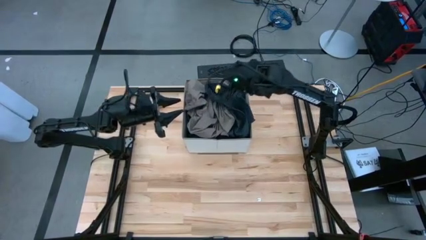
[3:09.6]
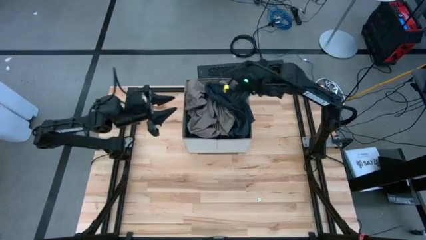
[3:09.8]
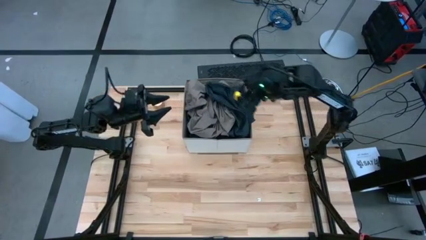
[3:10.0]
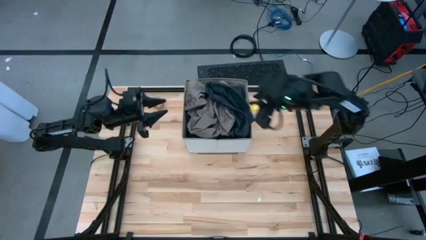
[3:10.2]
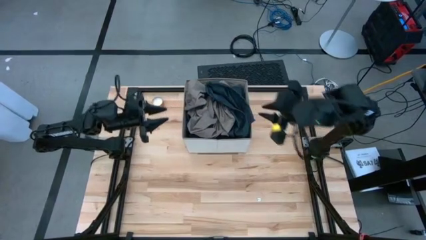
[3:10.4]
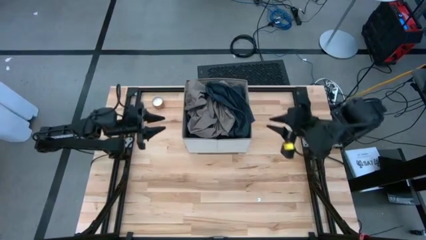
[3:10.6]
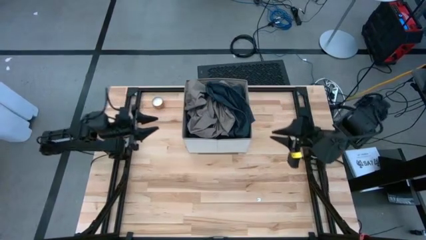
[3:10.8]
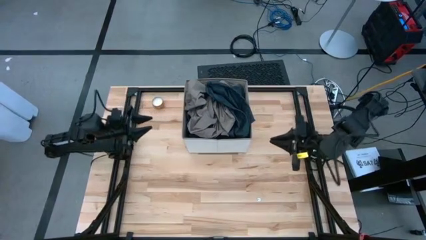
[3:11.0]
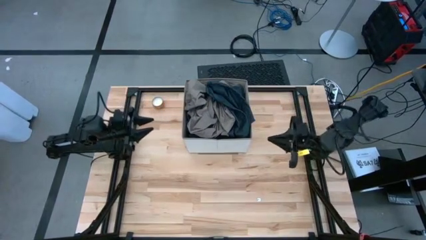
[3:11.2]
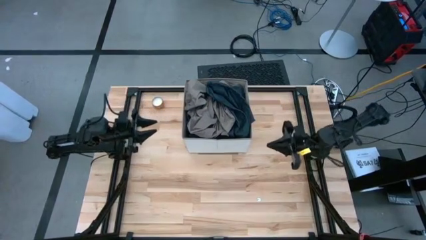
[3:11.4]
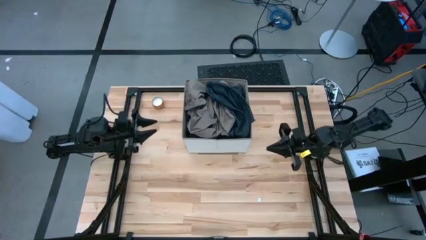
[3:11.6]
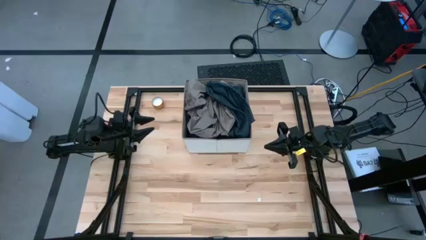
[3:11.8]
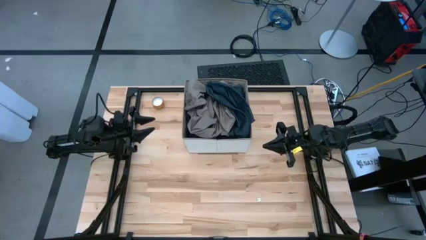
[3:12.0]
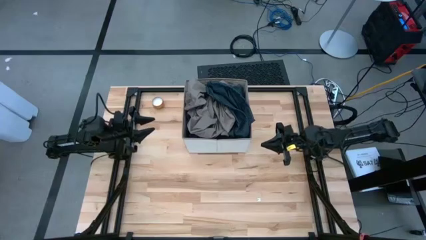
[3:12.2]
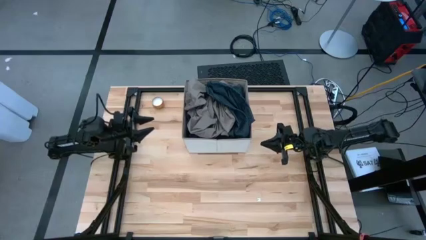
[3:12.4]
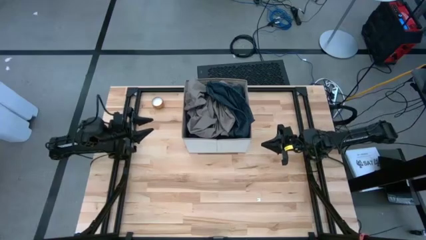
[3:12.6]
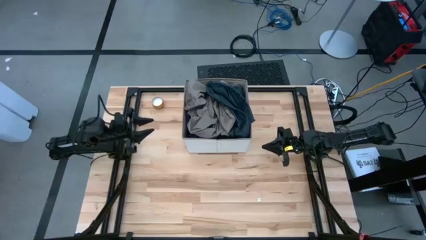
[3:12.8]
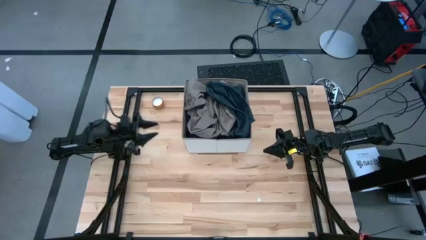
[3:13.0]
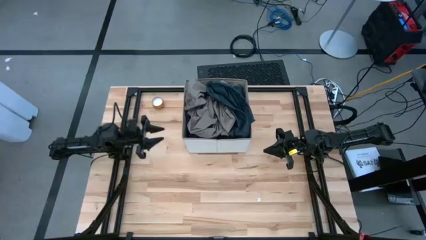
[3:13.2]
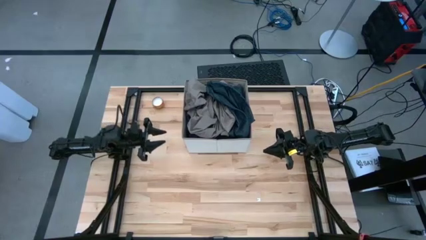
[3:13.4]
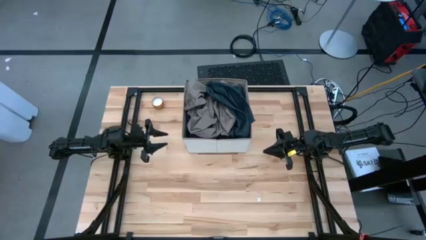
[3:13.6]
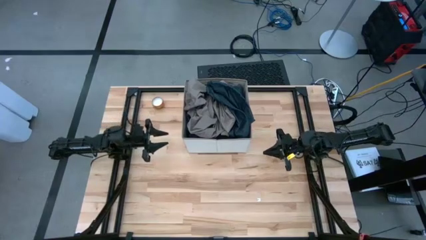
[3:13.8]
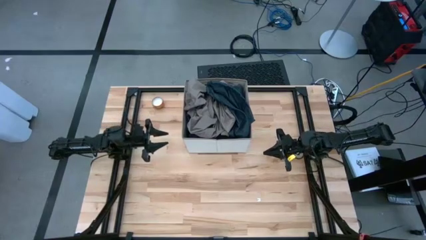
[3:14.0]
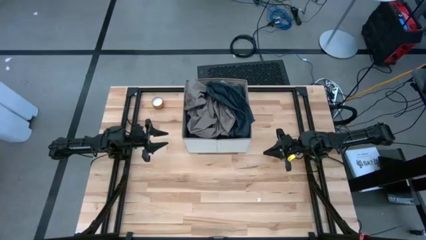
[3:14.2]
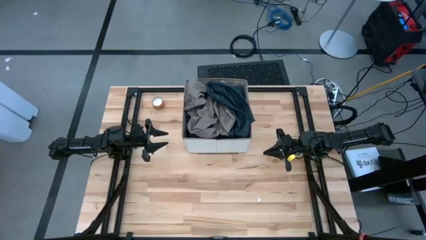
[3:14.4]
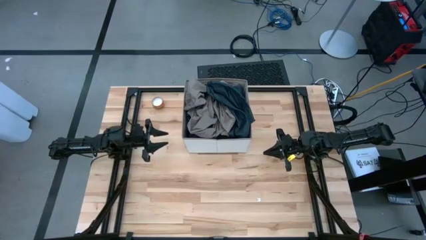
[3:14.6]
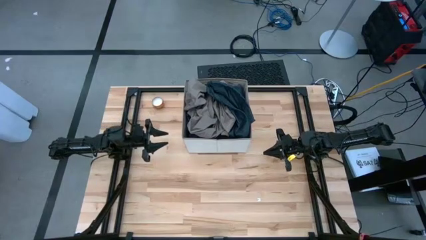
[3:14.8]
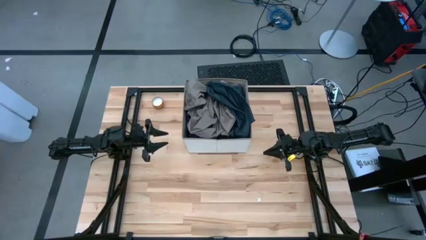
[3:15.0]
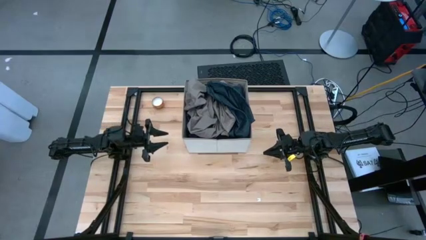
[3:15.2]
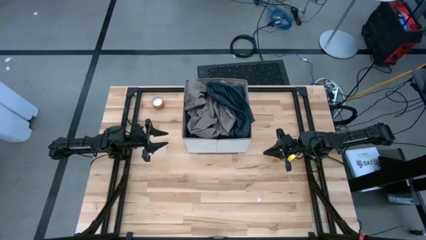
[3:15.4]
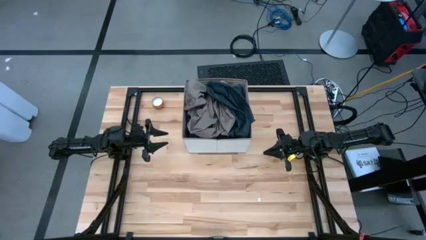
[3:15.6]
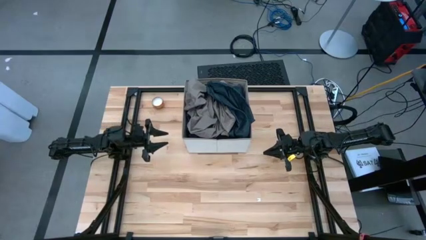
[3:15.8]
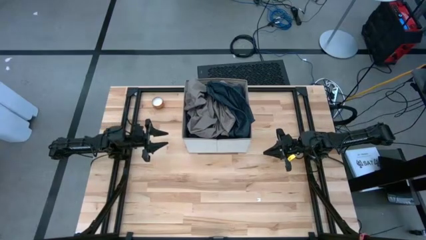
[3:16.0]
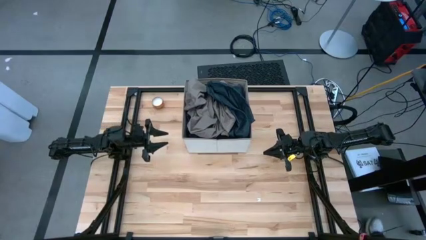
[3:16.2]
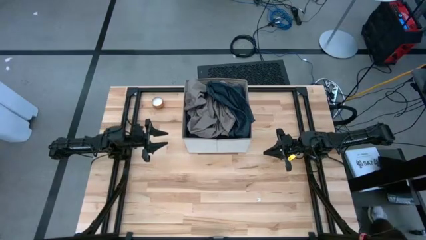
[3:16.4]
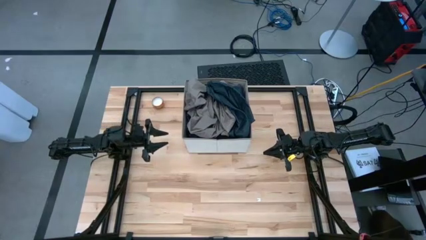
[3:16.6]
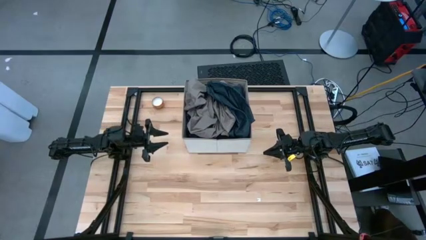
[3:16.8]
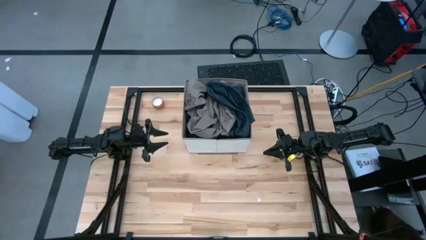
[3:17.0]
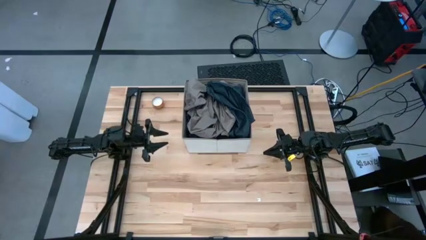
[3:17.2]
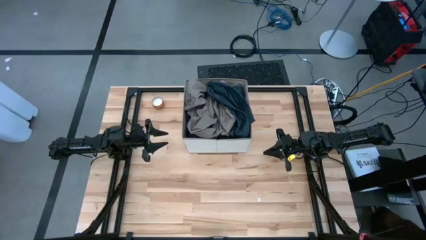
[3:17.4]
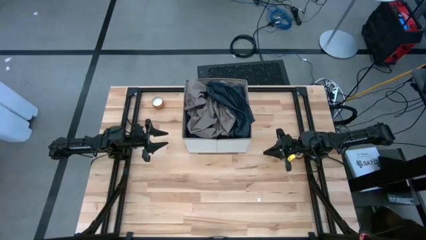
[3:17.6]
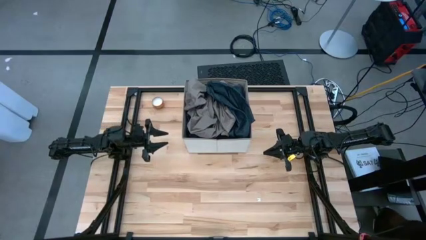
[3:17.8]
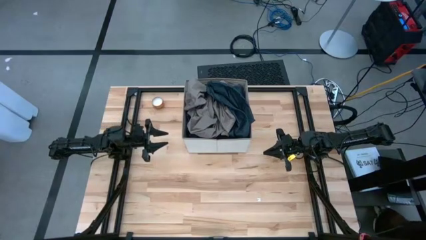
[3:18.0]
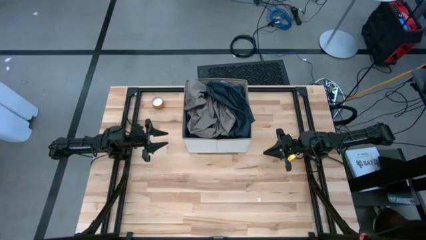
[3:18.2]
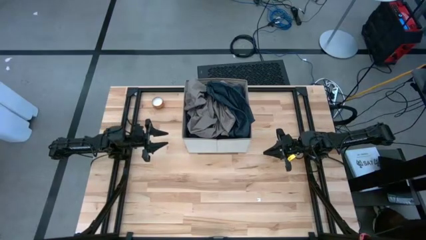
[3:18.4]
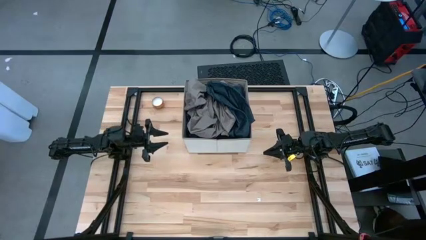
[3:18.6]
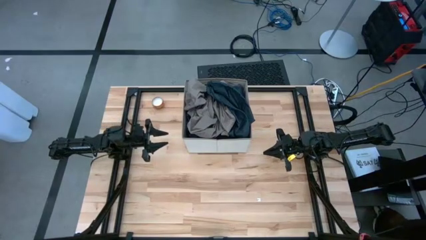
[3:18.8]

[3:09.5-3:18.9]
Task: Sort clothes
Return to Home Position
